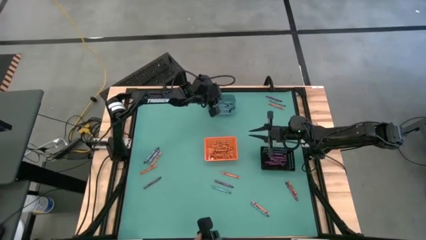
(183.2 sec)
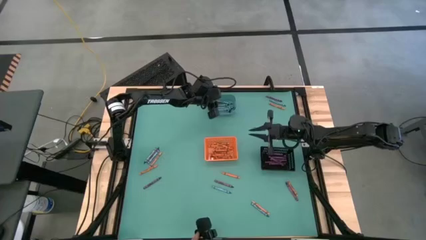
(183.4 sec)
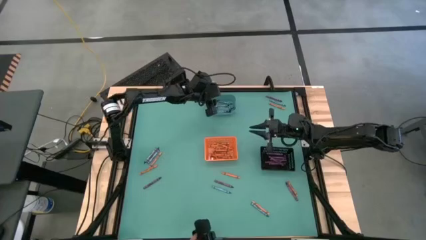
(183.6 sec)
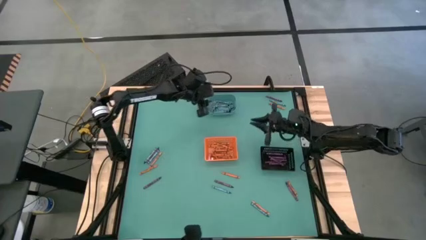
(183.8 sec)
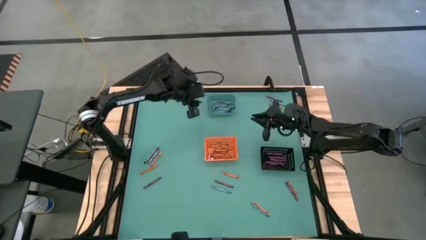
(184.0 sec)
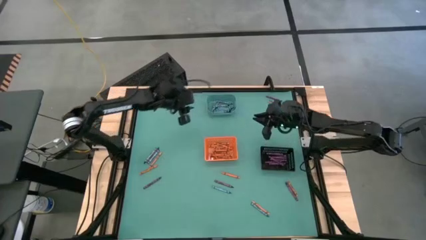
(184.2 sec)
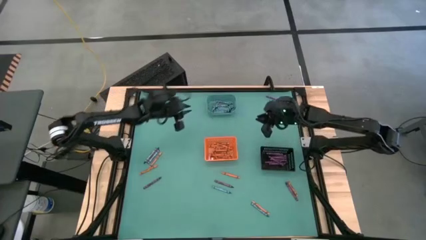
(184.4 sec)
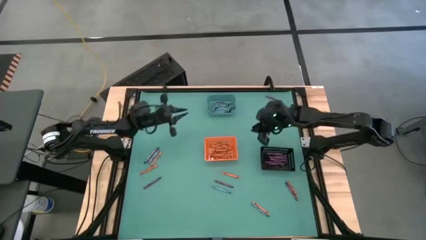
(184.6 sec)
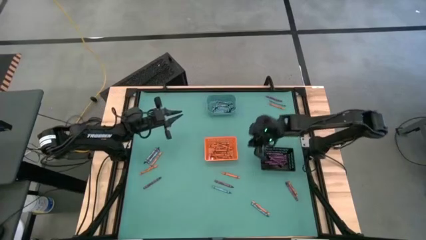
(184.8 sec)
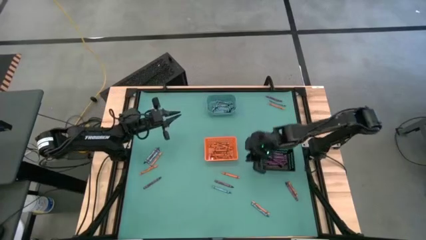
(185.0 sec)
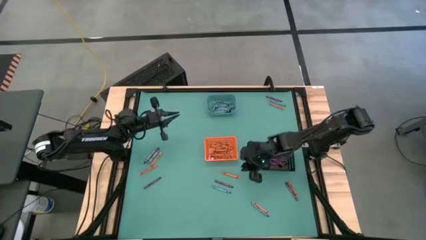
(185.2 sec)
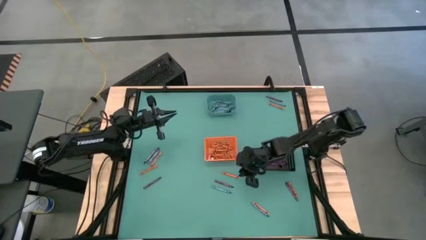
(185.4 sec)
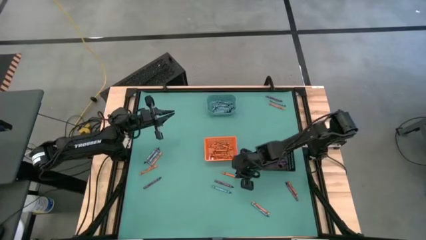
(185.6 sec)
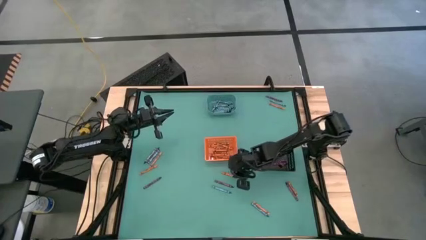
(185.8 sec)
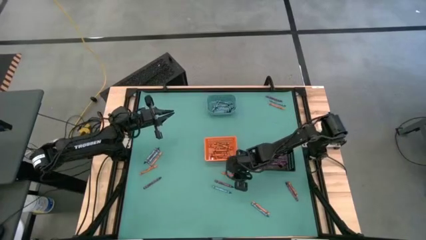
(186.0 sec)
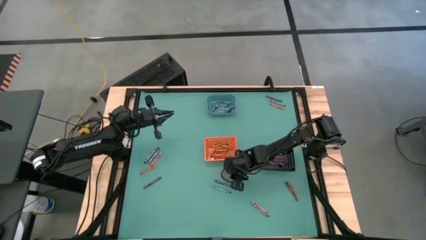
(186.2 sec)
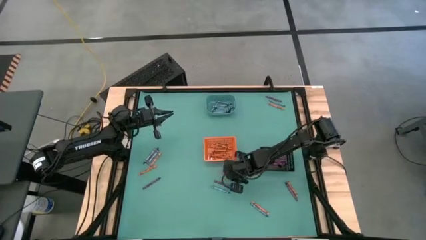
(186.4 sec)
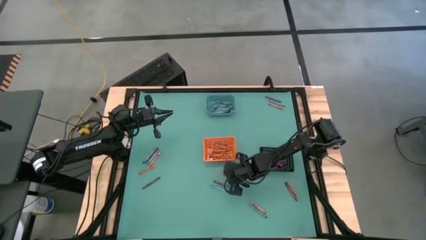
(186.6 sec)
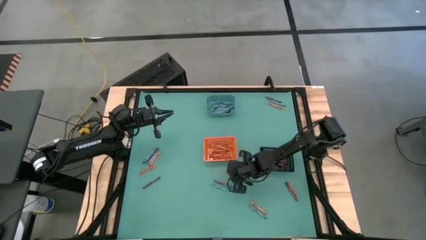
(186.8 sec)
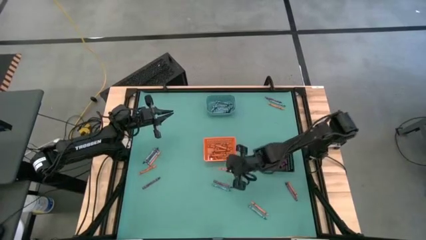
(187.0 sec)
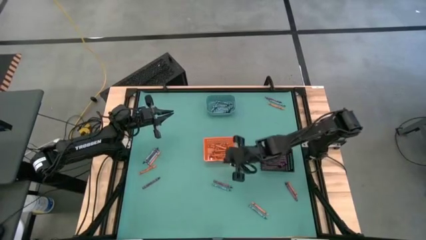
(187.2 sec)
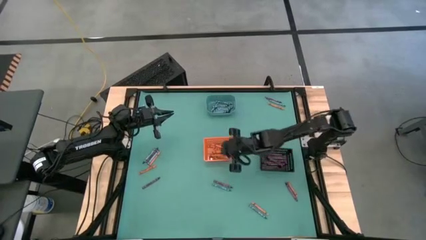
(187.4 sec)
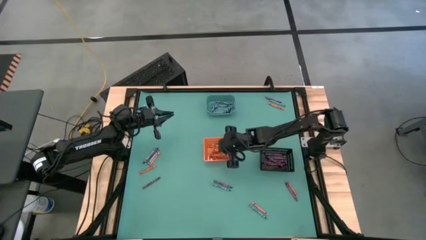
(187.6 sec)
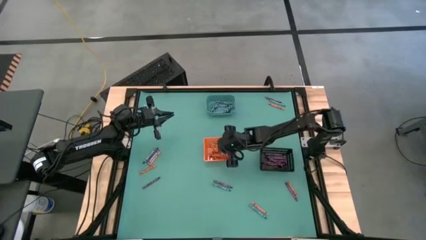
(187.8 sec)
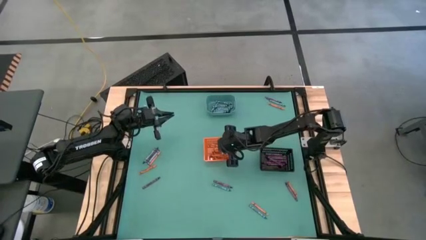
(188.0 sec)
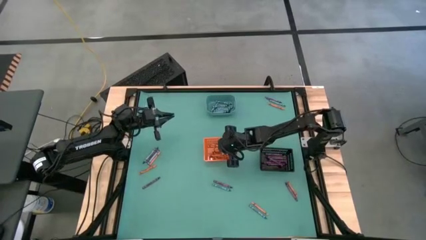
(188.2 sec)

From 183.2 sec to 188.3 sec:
Task: Sort crayons
Put the orange crayon into the orange bin

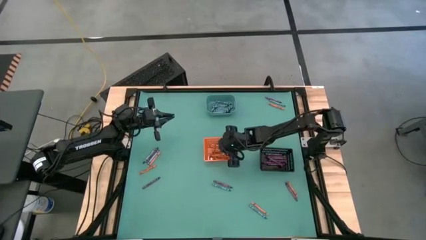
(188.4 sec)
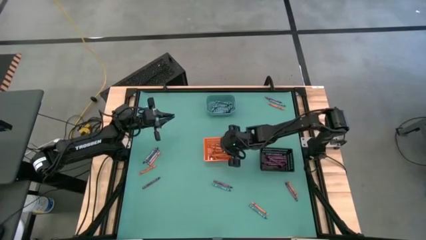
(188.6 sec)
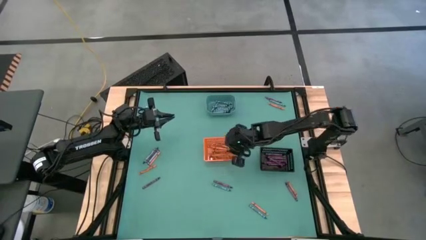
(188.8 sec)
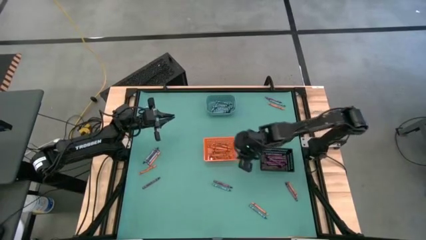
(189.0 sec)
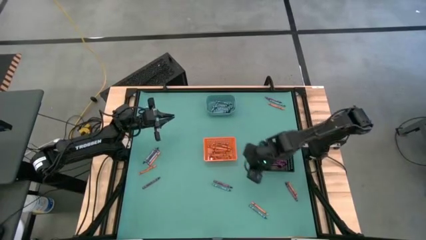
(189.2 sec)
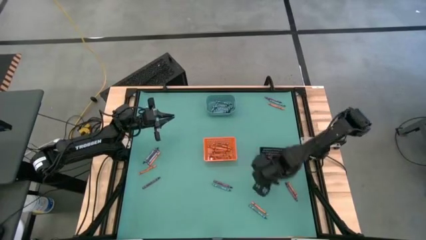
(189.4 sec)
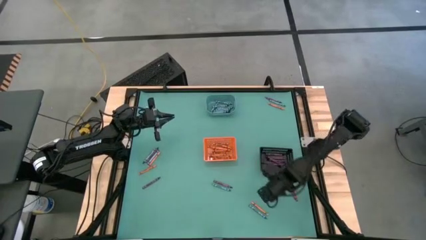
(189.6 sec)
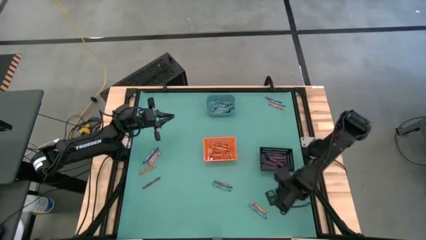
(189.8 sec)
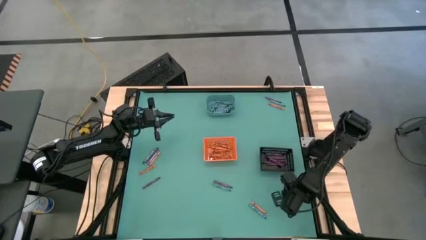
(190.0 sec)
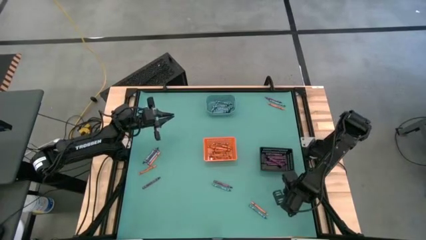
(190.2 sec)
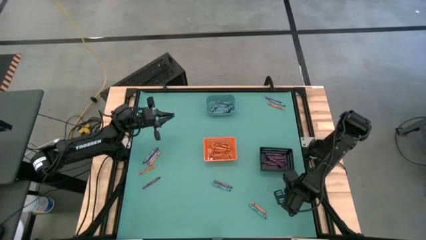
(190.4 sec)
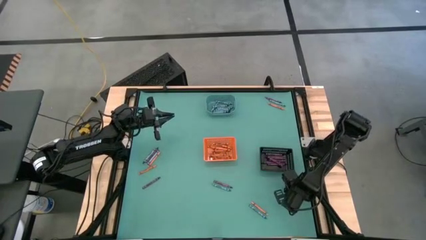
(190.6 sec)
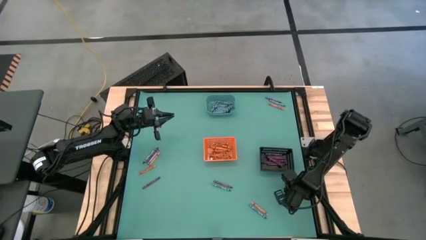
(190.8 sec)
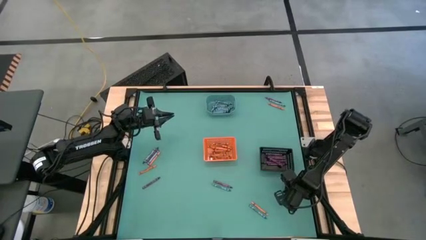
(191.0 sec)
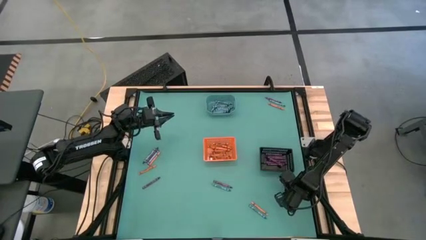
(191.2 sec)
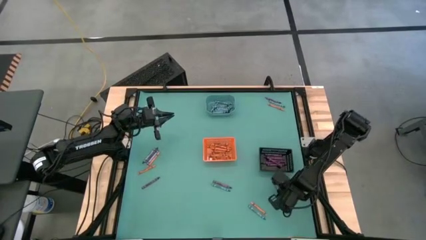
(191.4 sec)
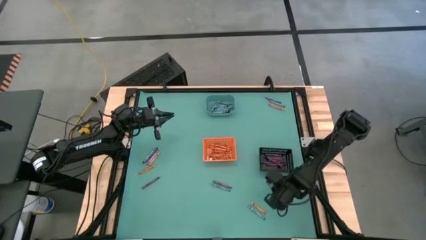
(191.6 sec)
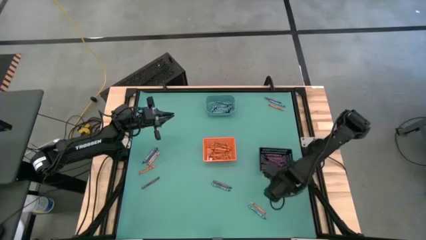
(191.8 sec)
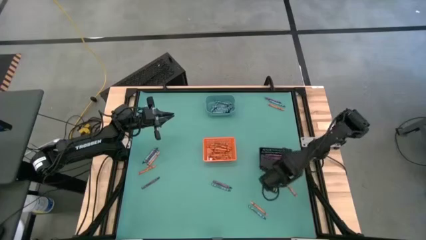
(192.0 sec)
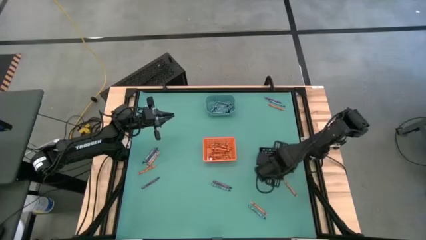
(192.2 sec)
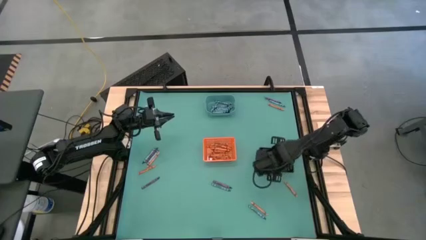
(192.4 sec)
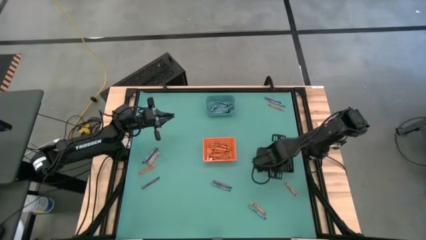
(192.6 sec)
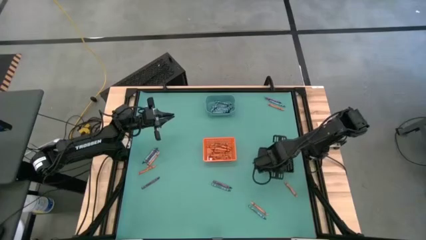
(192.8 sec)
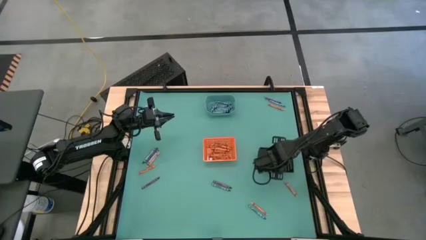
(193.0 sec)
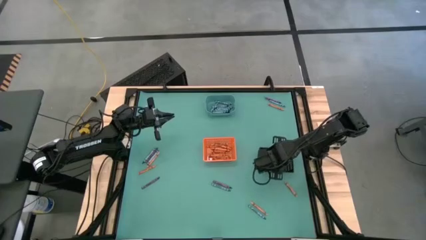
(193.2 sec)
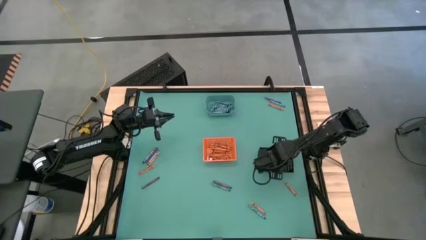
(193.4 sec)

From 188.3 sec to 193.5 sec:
Put the violet crayon into the black bin

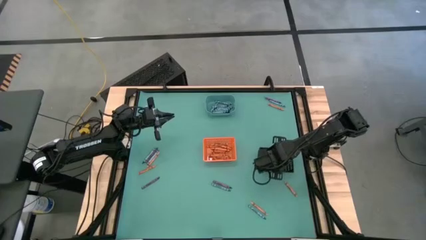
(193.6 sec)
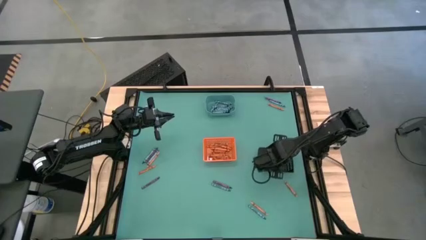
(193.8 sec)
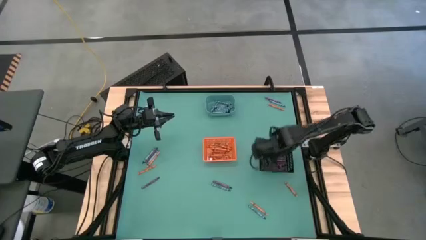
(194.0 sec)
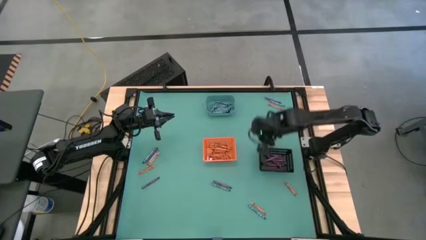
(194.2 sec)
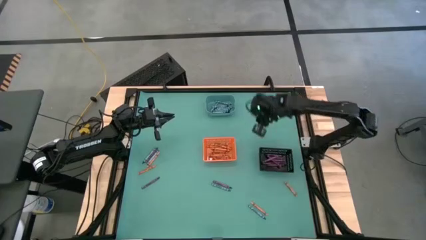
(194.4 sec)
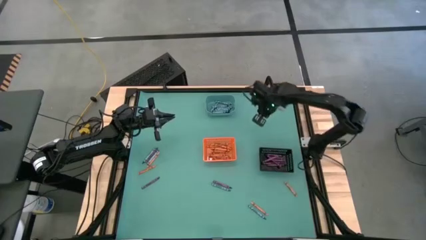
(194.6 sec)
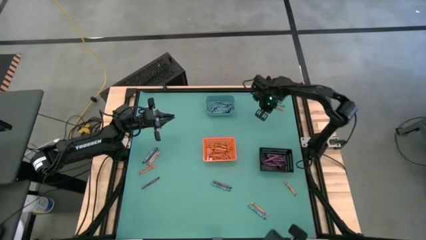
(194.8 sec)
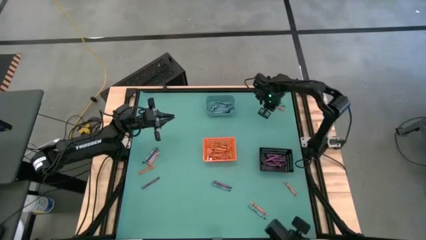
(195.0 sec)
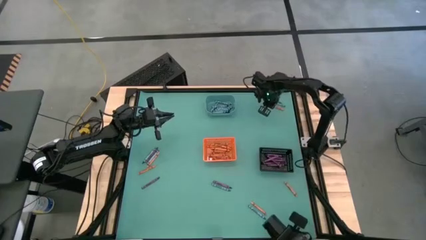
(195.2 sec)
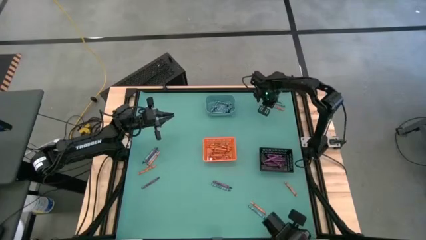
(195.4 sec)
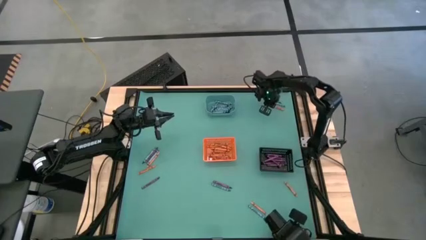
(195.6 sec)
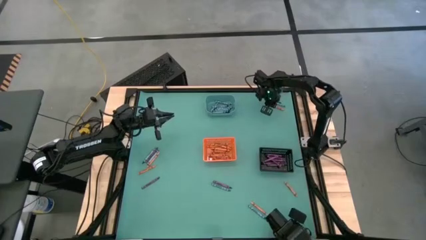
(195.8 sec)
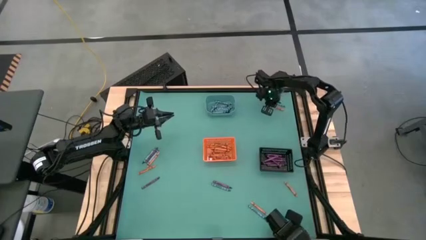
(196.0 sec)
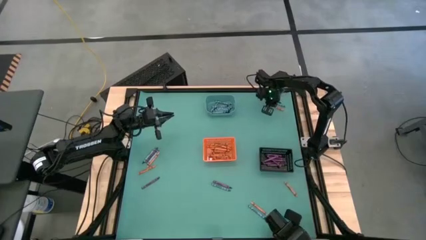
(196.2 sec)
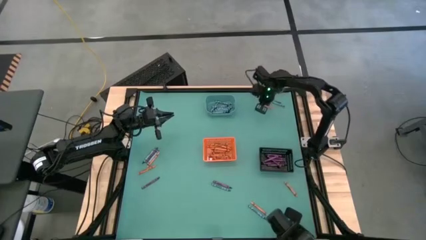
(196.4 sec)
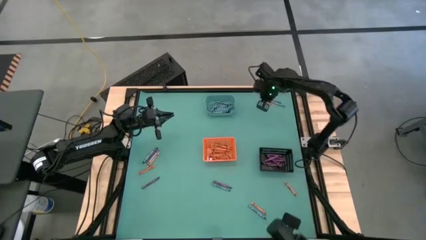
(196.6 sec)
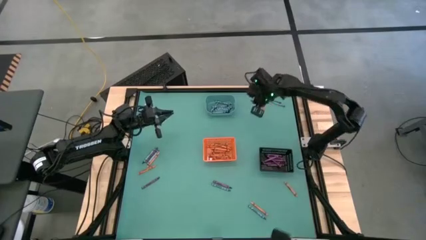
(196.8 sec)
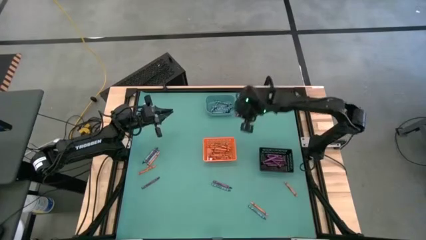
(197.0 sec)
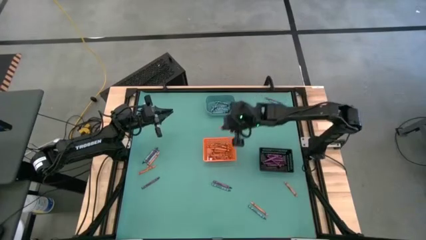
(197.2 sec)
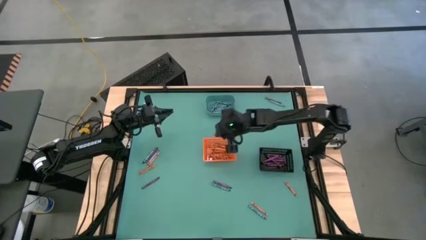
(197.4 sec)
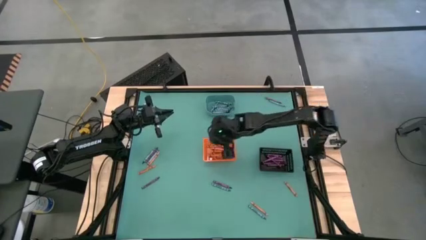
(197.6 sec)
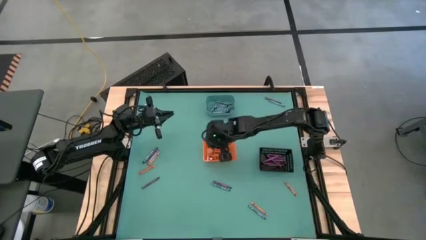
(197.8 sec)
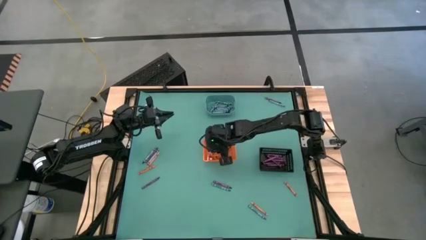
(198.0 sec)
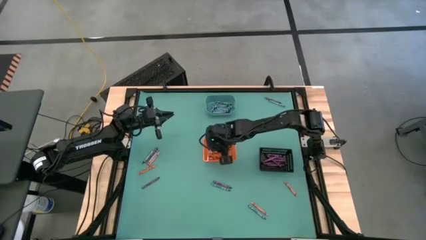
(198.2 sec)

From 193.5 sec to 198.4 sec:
Put the orange crayon into the orange bin
